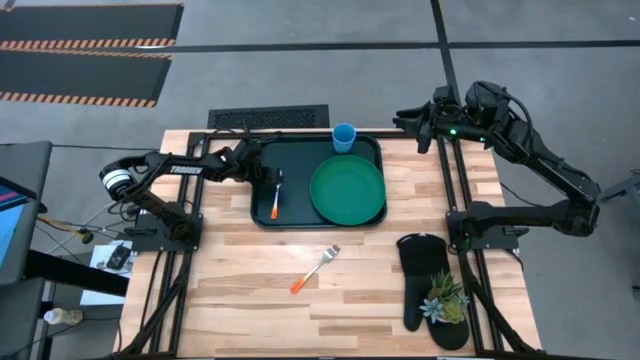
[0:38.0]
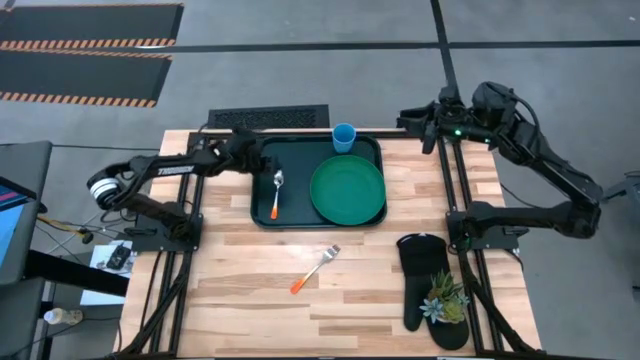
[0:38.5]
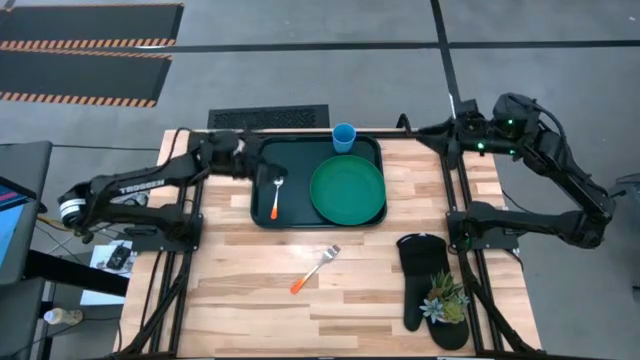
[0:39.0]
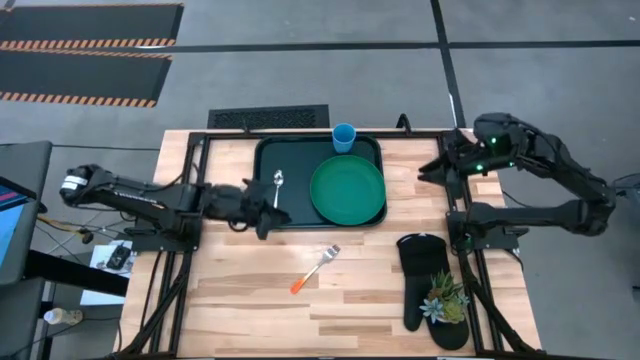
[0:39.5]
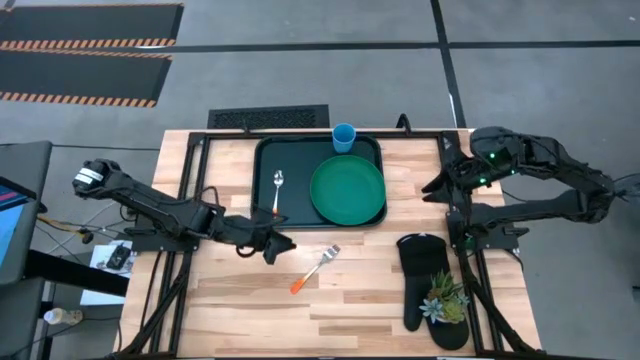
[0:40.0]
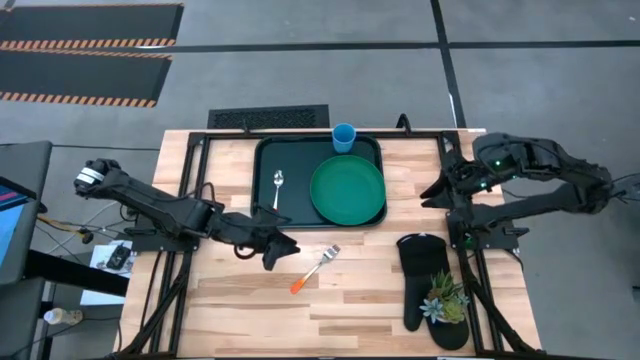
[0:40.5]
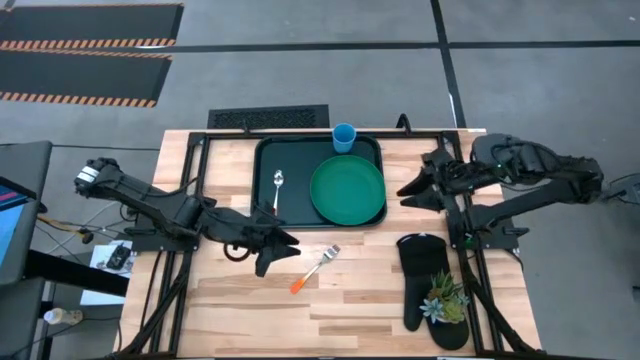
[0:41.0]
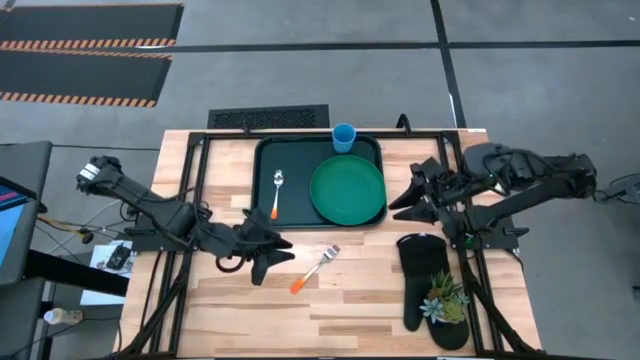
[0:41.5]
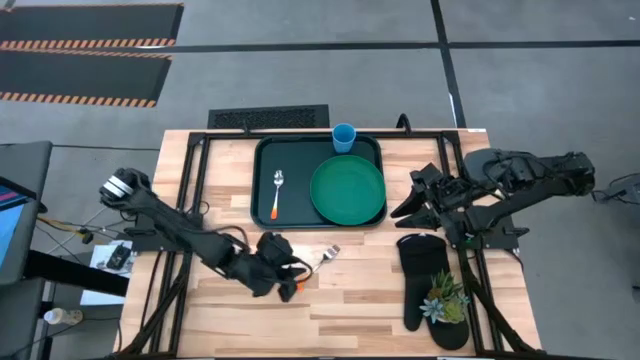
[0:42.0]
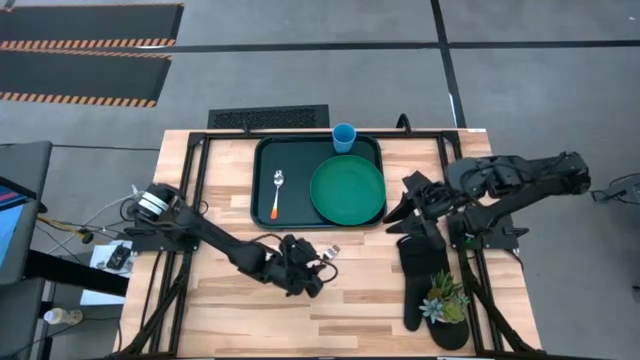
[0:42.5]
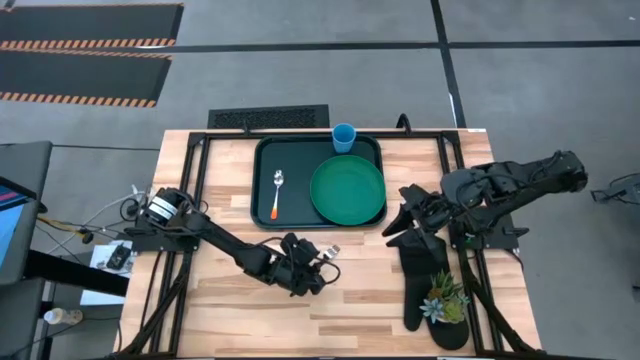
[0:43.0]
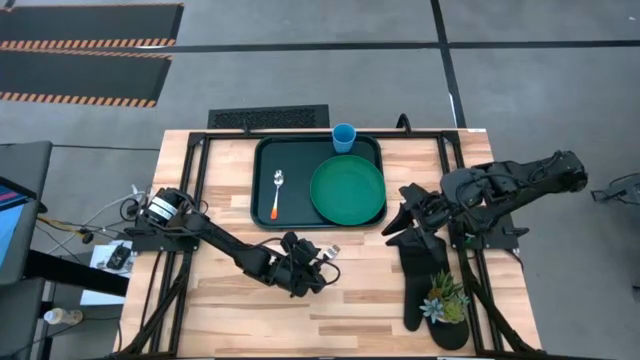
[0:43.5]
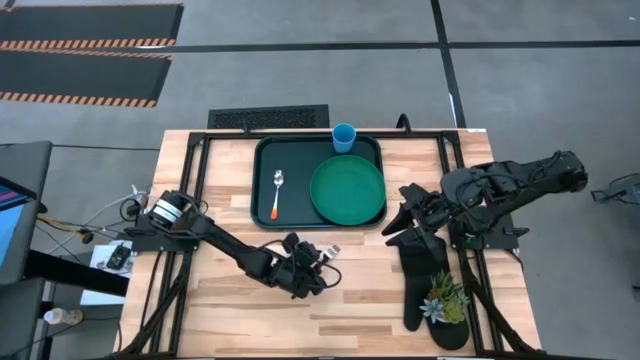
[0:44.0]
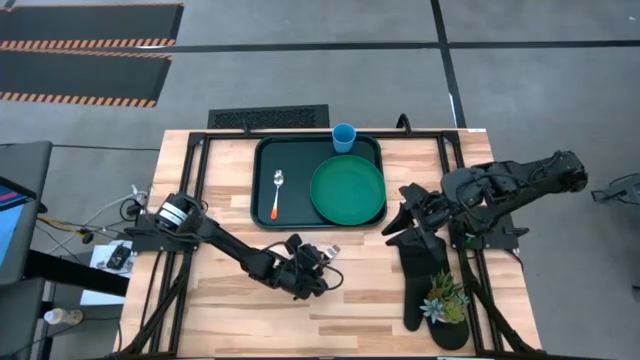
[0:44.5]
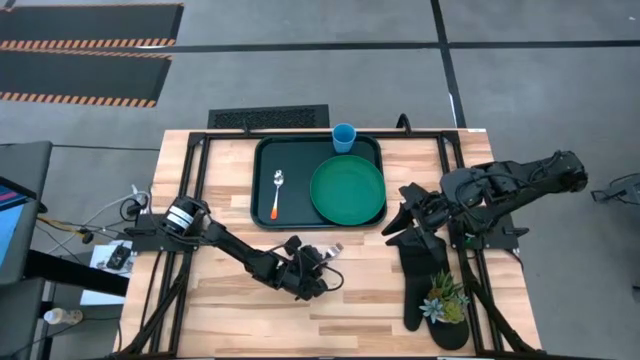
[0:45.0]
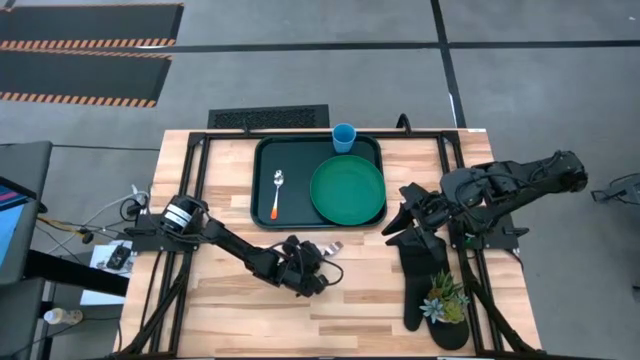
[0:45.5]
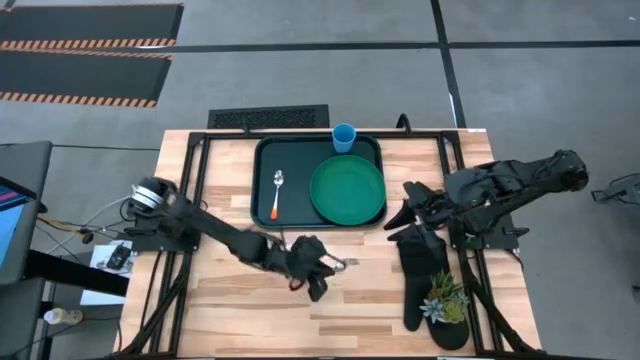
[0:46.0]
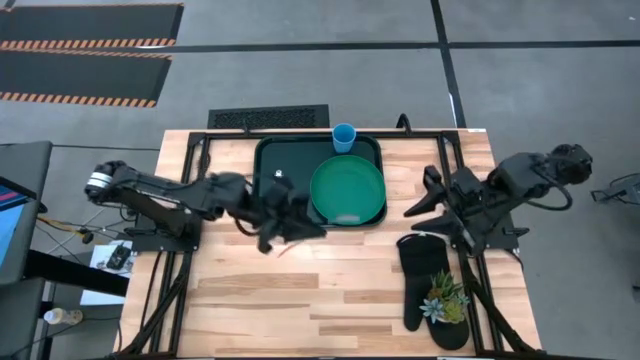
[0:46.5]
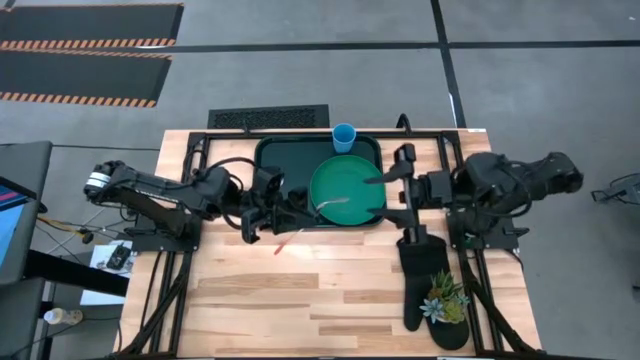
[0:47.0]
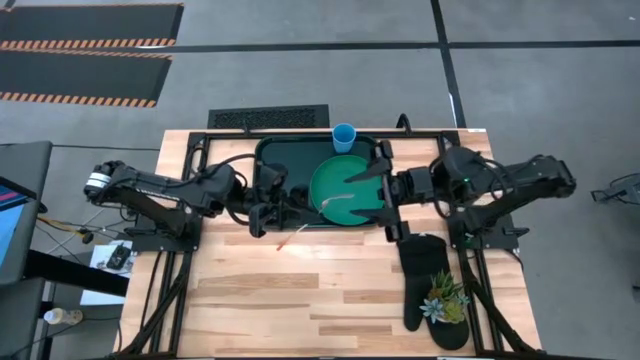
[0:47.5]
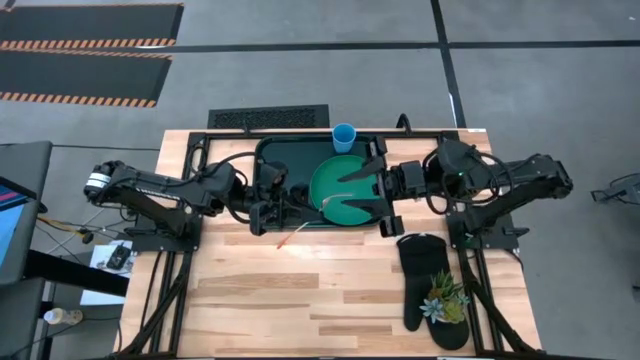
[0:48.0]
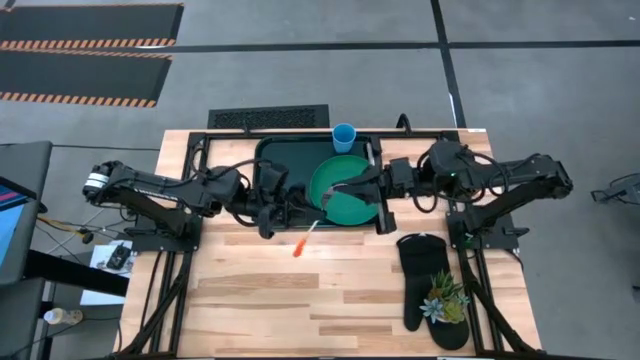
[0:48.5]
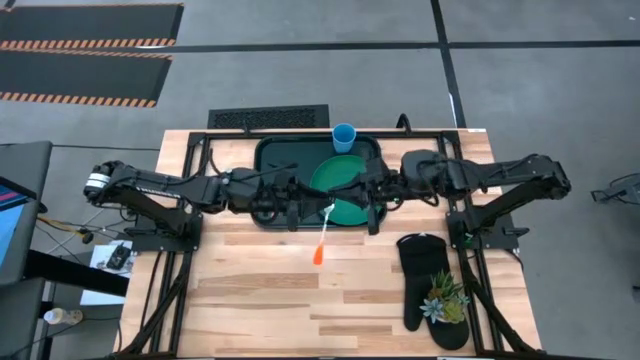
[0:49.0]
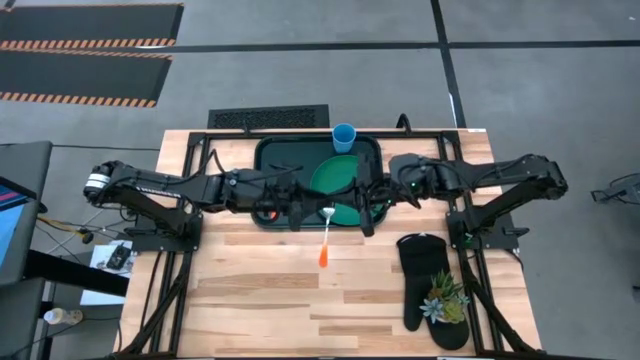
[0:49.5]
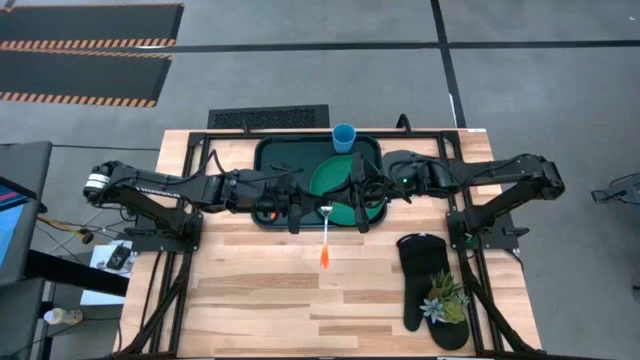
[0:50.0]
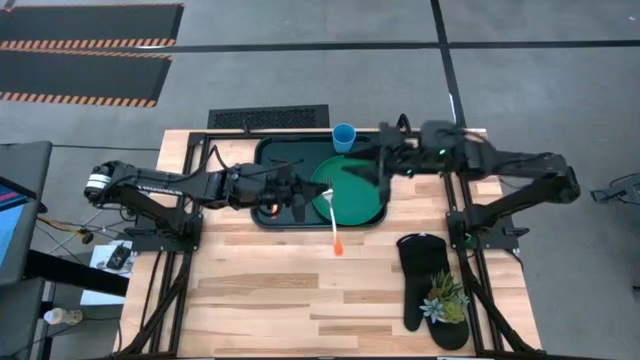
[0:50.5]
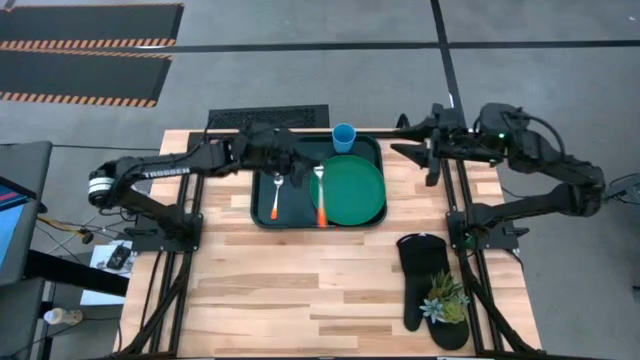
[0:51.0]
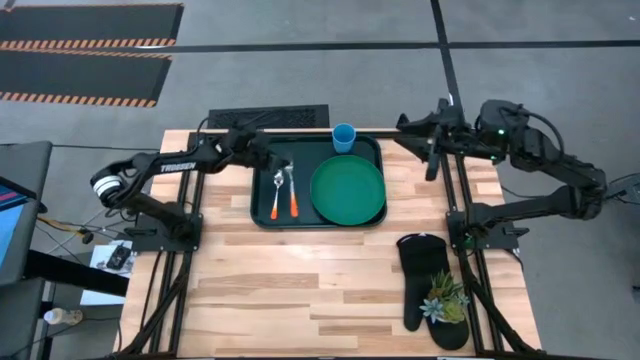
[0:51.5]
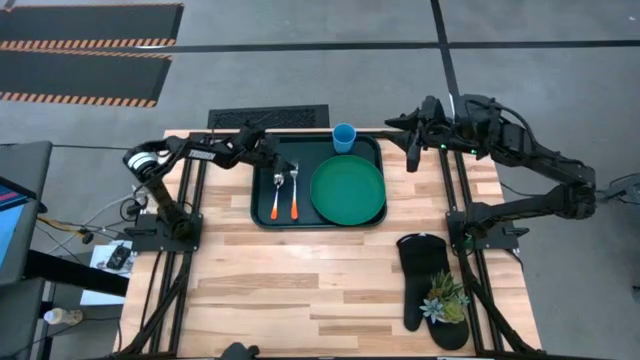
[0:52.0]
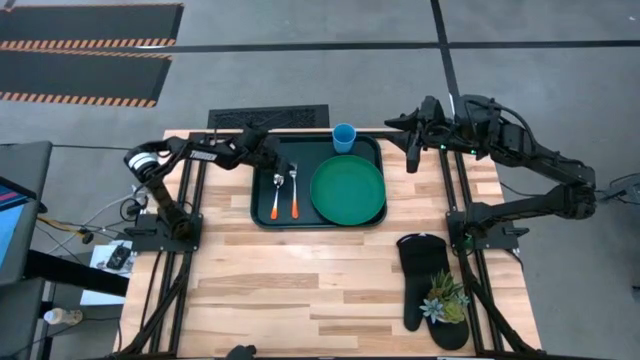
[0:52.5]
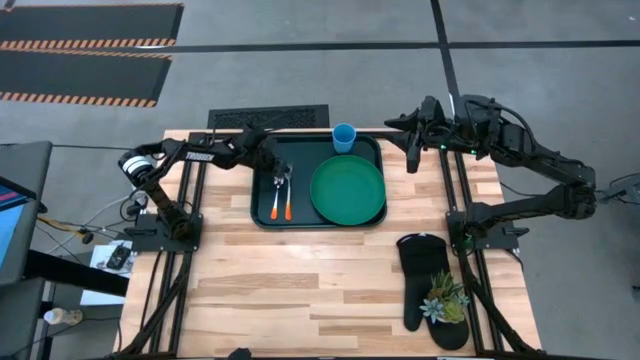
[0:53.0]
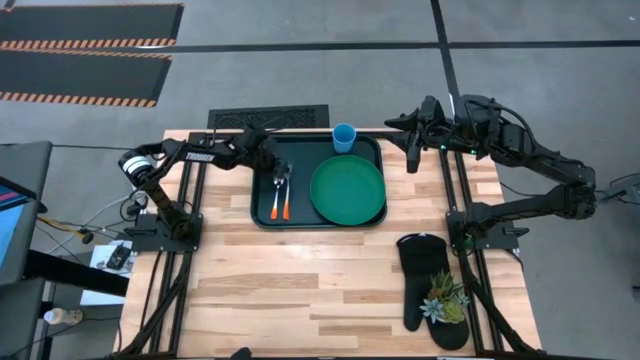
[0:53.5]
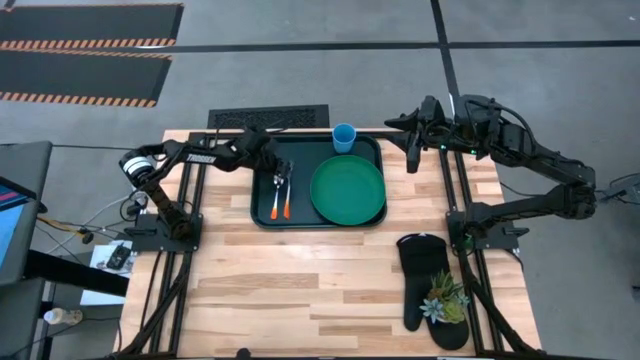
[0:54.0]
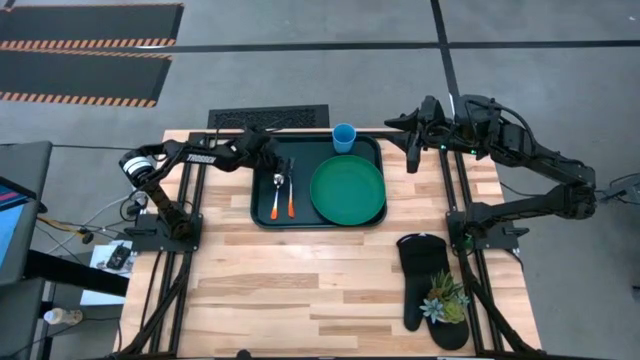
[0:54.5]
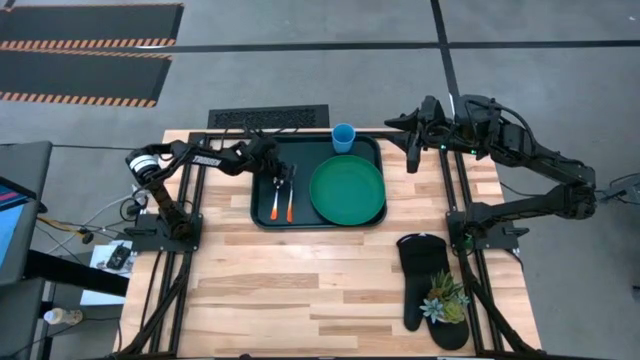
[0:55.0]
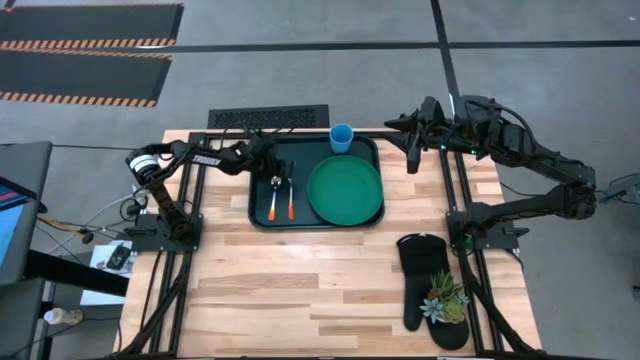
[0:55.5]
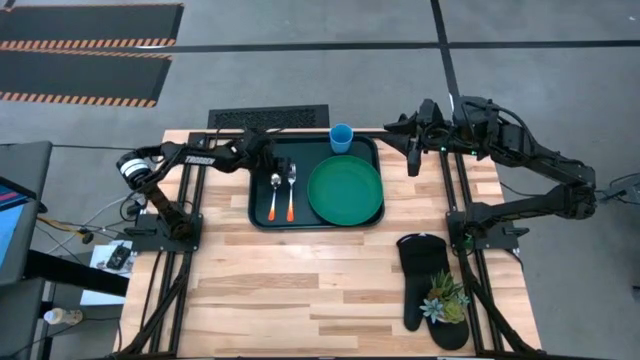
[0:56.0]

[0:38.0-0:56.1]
Task: Pick and place plate/cup/fork/spoon on tray
Put the orange fork in between the green plate and the orange spoon on the black tray
